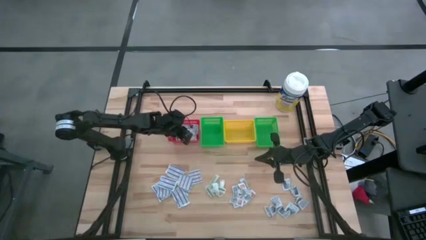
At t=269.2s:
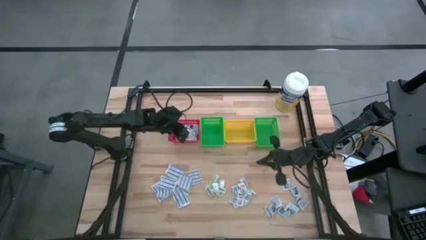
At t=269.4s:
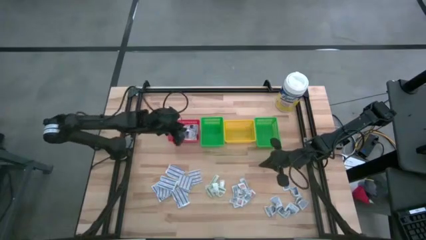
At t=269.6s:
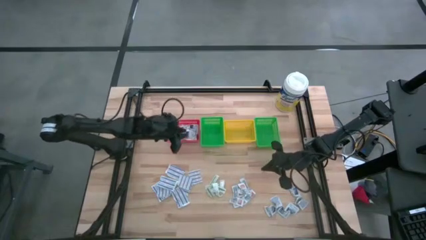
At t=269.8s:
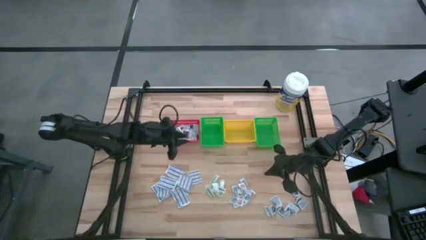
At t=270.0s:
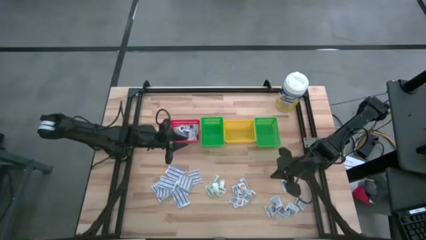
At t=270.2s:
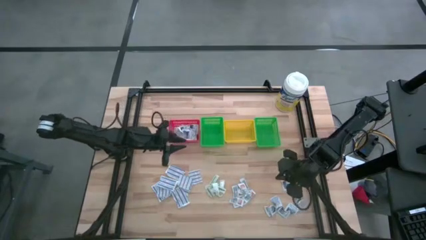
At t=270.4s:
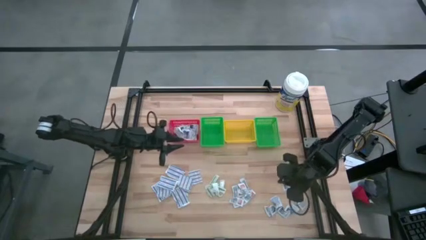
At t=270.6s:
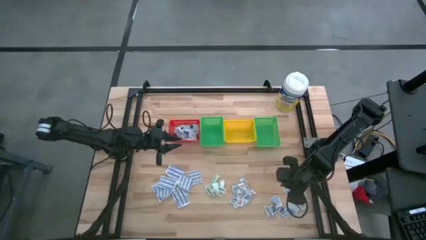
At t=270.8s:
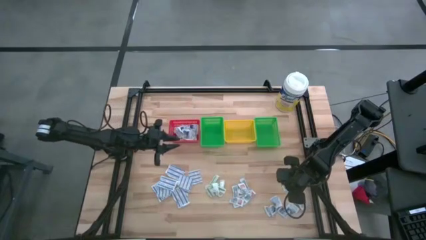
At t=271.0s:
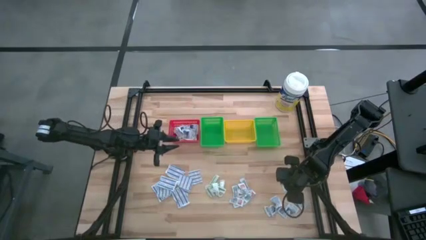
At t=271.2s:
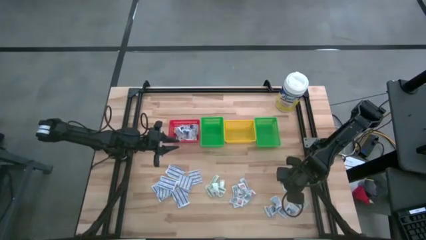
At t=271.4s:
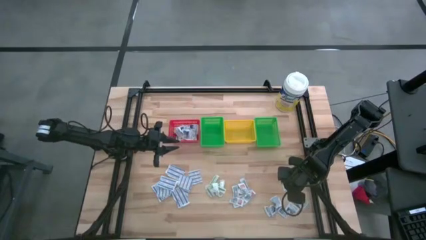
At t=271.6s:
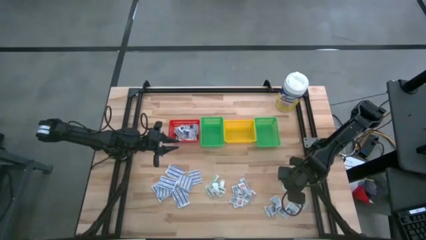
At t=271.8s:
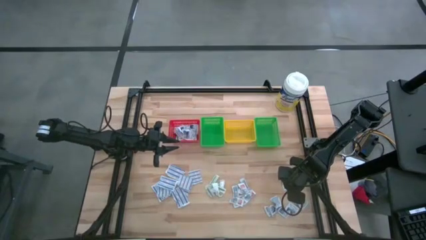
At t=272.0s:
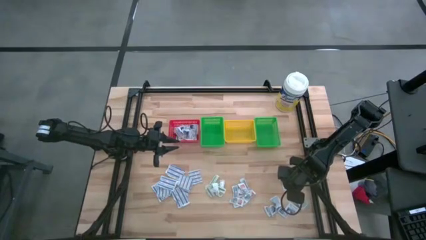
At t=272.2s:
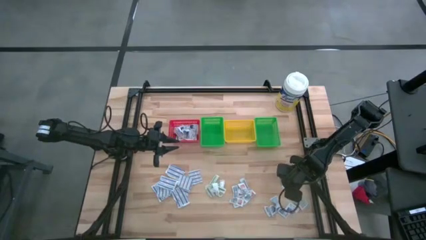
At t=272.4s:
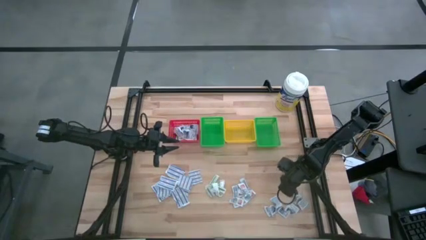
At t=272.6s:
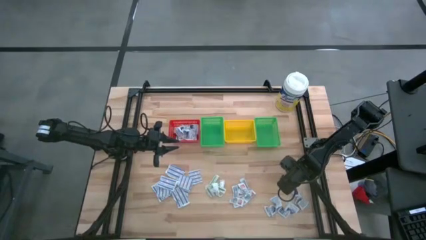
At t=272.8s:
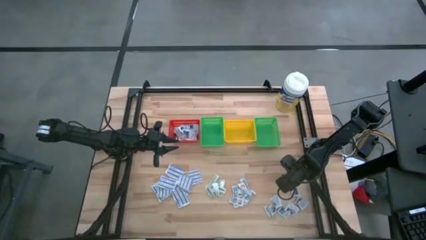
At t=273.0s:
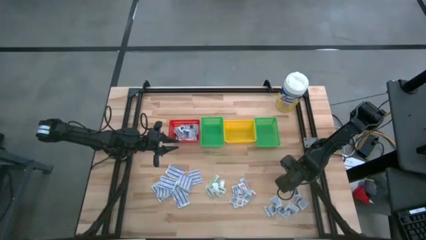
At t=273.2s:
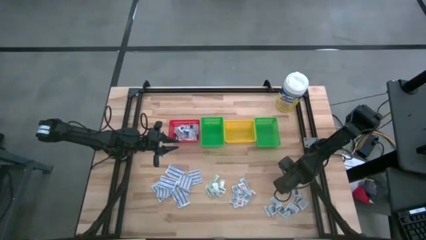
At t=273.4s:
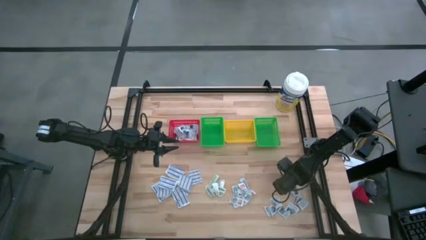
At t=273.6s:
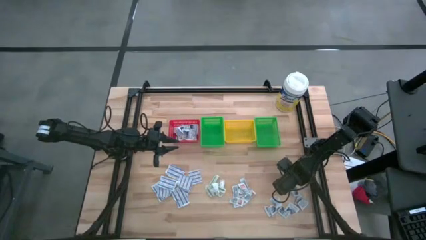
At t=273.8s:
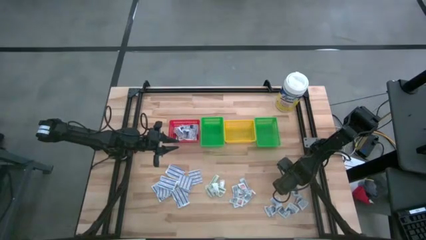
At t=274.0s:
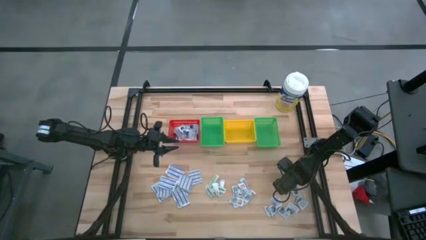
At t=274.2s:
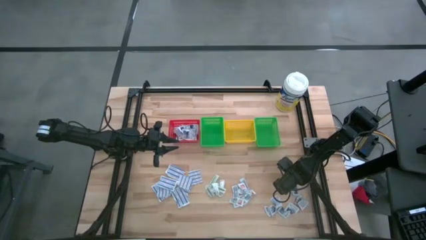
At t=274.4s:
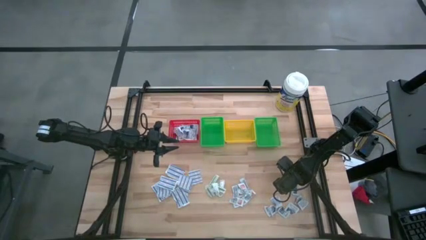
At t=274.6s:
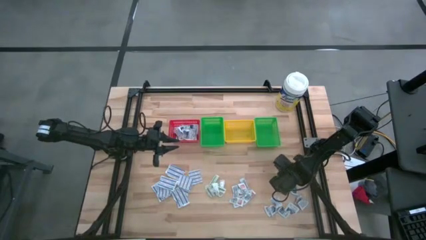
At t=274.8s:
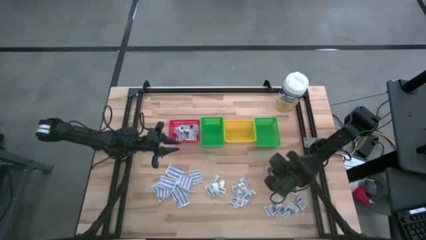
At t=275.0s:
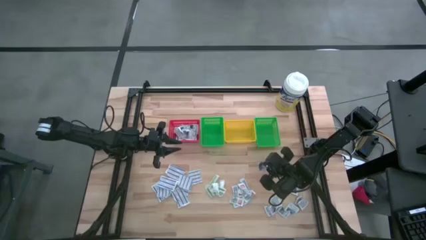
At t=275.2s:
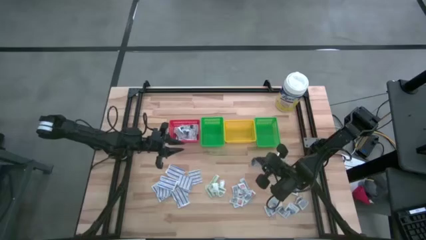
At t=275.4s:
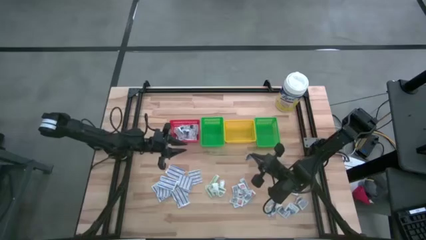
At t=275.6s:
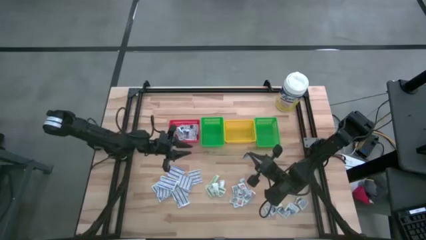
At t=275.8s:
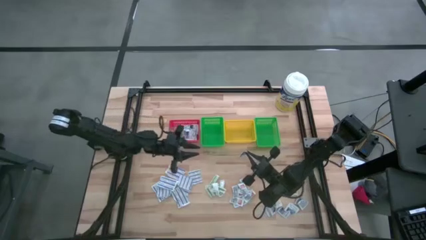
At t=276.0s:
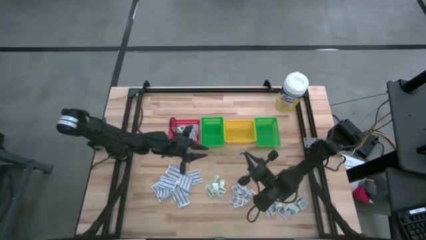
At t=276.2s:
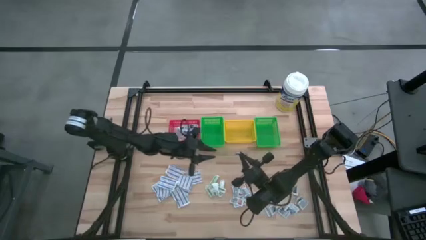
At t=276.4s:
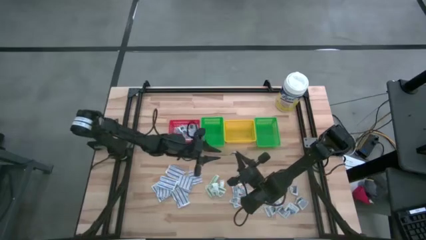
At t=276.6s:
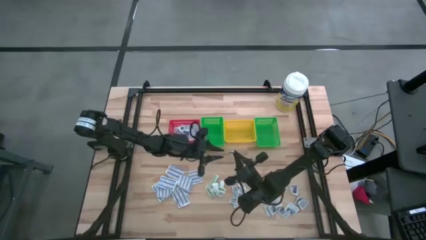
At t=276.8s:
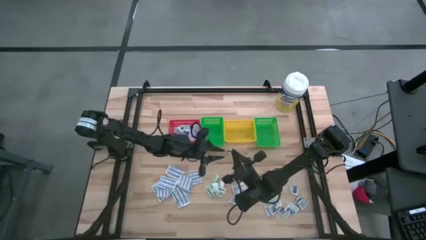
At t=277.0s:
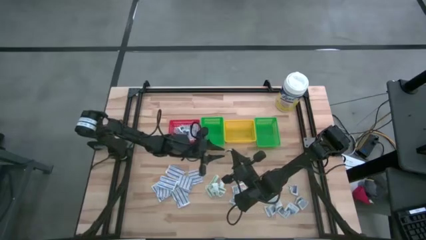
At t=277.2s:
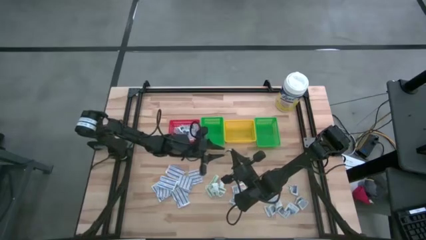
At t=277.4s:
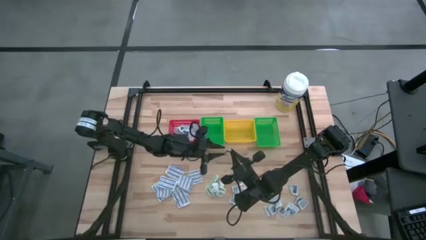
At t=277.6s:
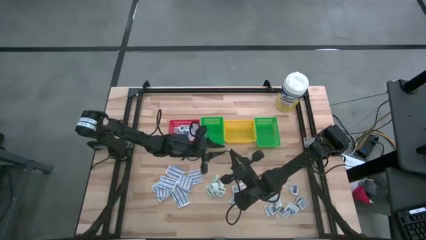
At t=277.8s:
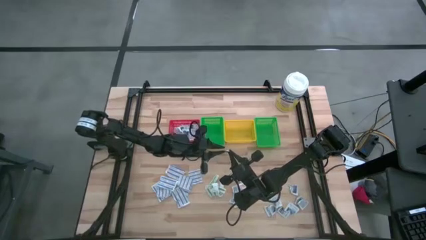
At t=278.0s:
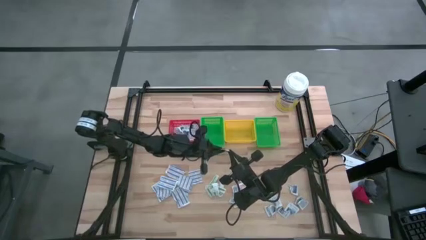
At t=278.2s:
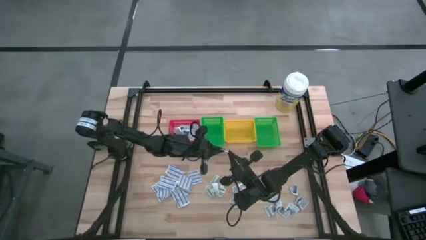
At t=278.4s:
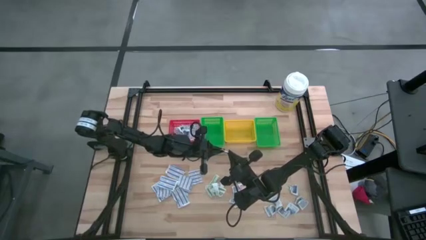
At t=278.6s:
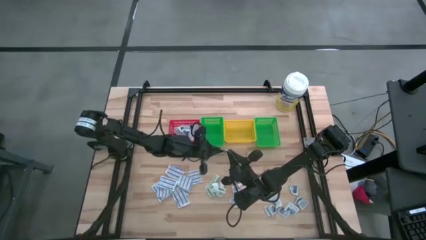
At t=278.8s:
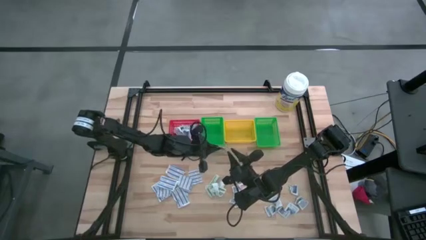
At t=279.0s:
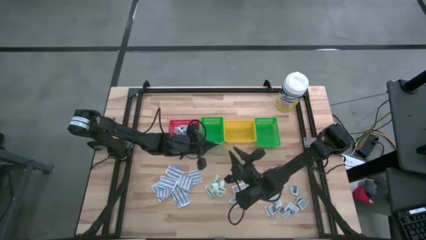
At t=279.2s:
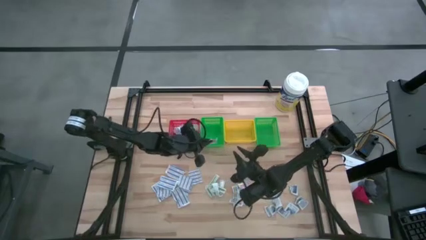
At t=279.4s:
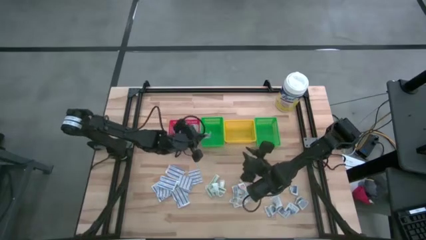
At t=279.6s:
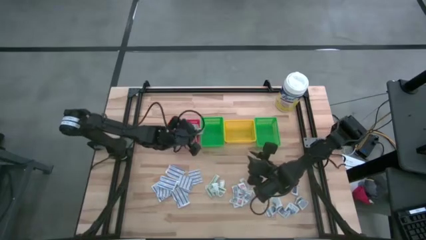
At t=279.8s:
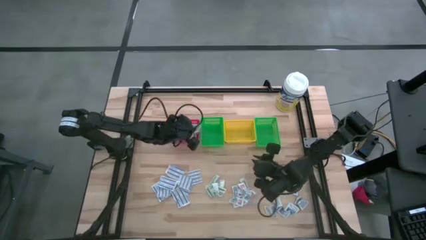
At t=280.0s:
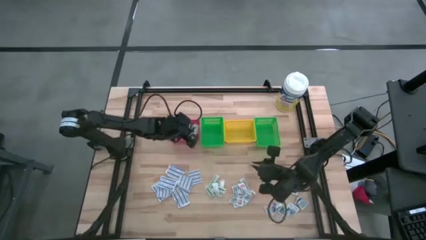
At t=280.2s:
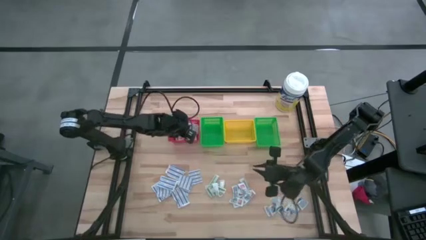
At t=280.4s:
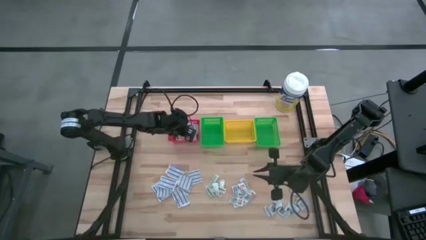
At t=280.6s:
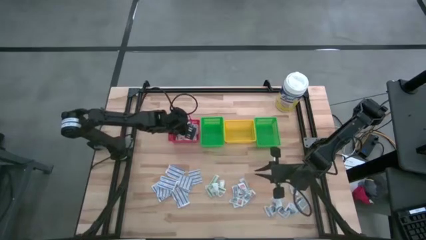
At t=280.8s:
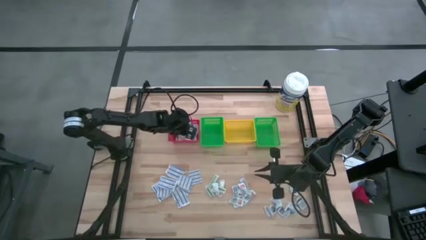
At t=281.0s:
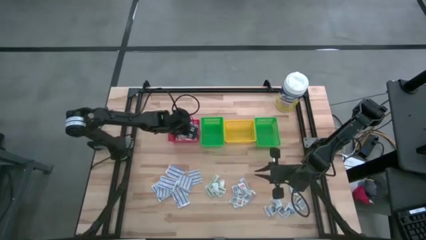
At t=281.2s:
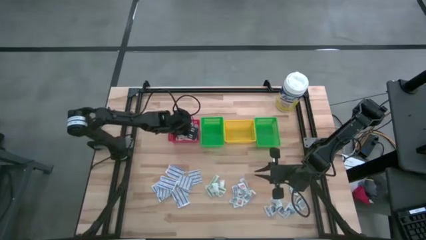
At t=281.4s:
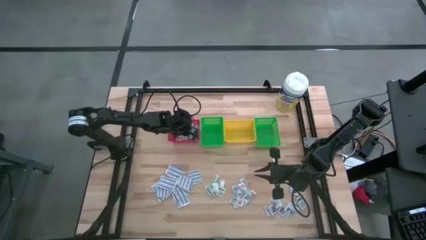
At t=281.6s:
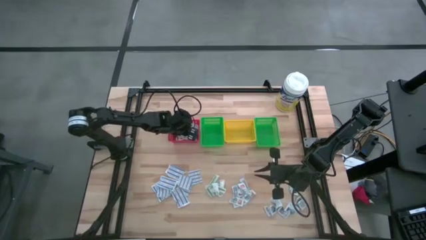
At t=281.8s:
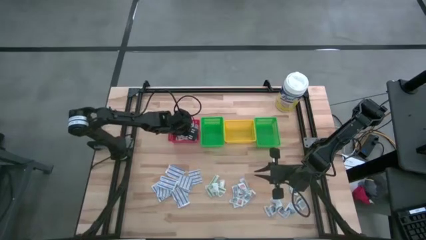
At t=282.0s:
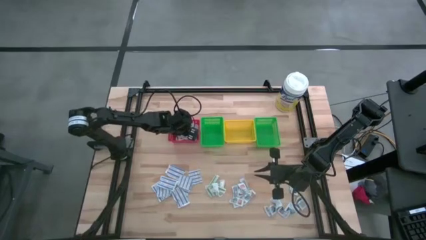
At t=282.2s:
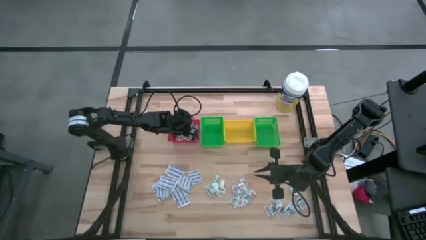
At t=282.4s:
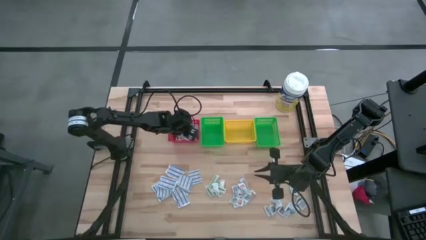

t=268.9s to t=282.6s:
Task: Pick & Place First Aid Supplies
Put the alcohol pad into the red basket

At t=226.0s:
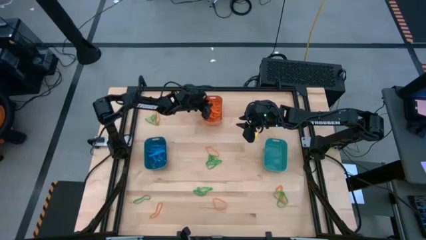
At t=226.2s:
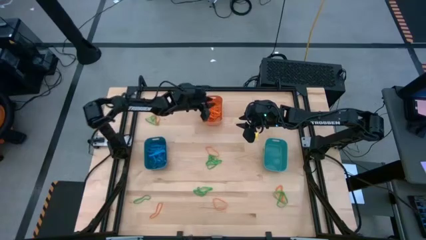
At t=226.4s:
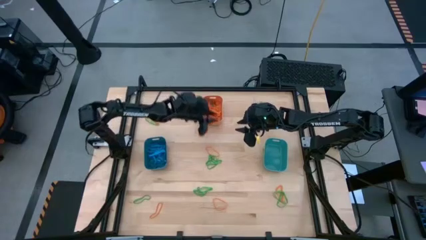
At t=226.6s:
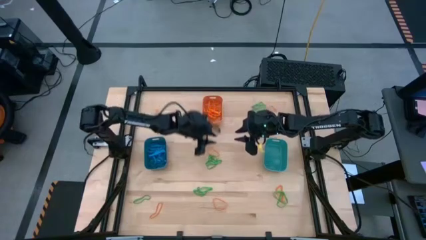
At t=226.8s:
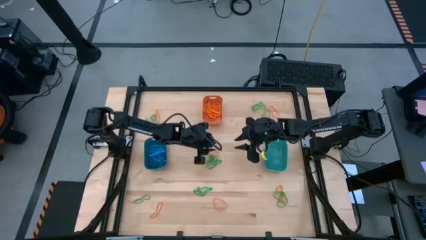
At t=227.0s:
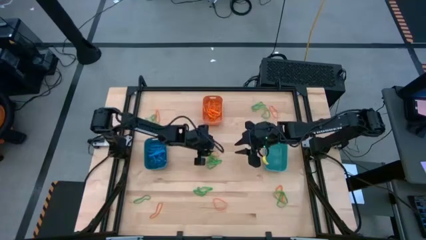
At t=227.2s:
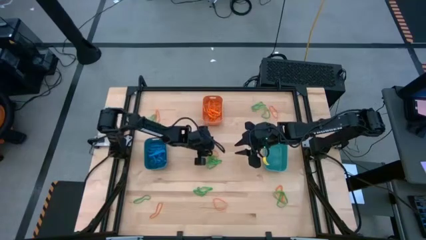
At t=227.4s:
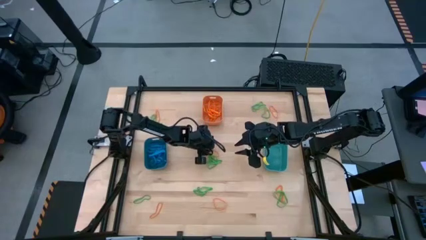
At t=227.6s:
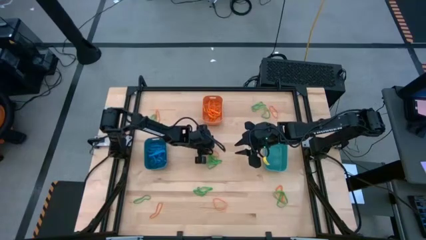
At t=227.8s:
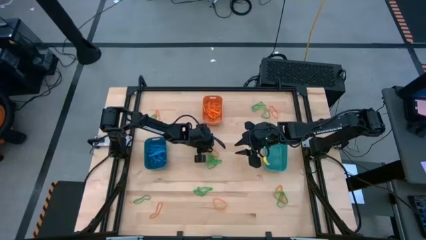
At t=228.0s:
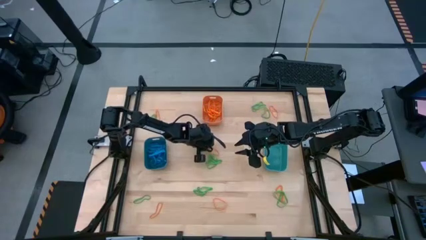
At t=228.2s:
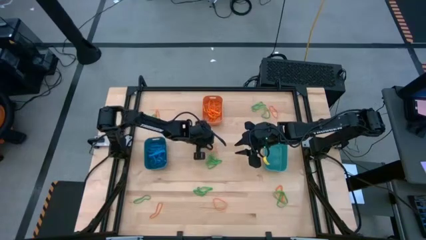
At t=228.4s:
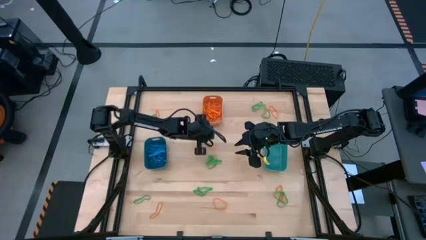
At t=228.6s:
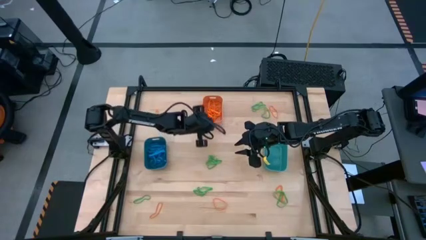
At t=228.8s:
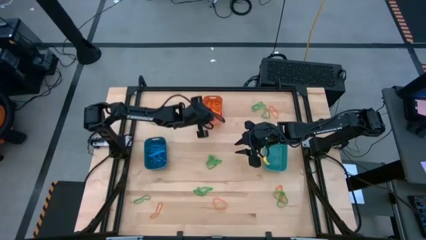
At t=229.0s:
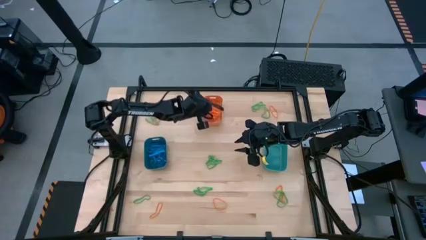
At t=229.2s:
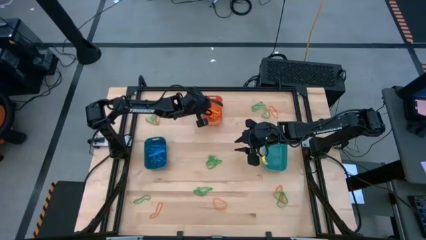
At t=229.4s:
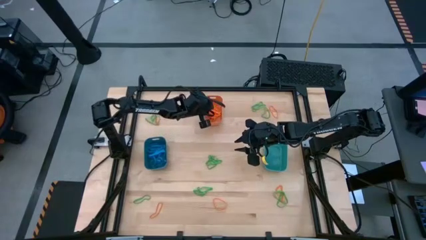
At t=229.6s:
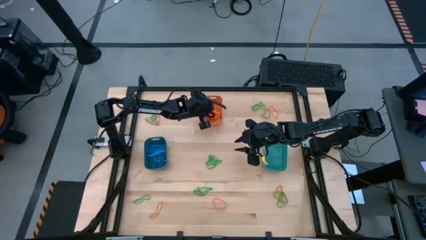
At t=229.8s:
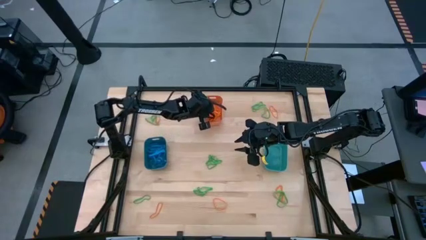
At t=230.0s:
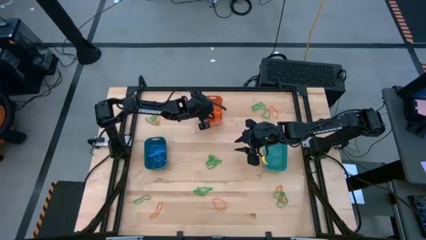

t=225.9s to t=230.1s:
Task: Sort rubber bands into baskets
Put the orange rubber band into the orange bin
